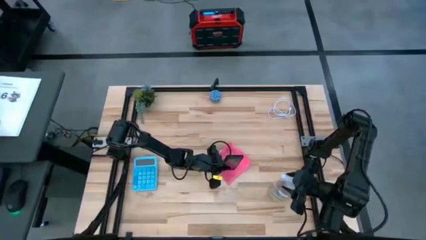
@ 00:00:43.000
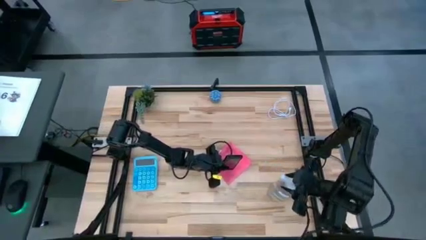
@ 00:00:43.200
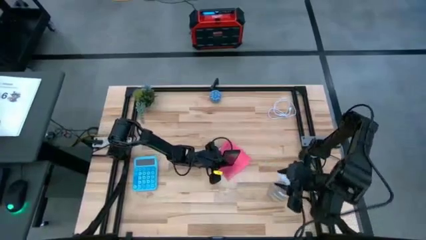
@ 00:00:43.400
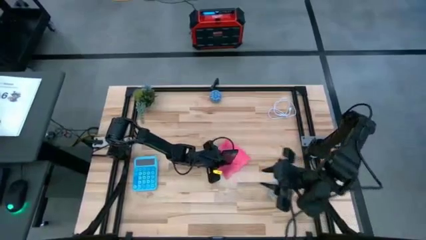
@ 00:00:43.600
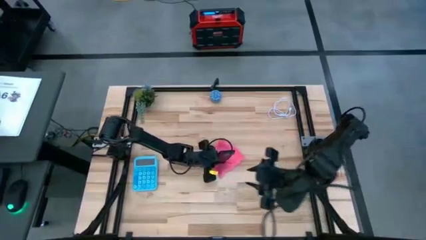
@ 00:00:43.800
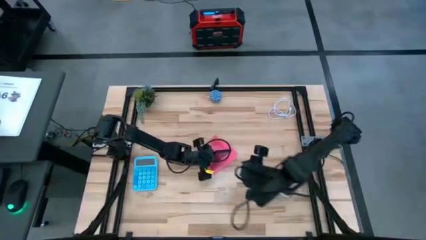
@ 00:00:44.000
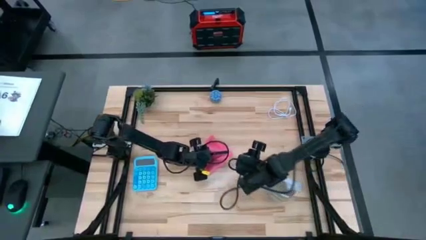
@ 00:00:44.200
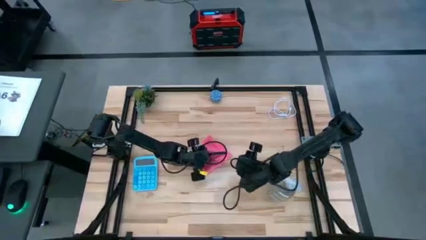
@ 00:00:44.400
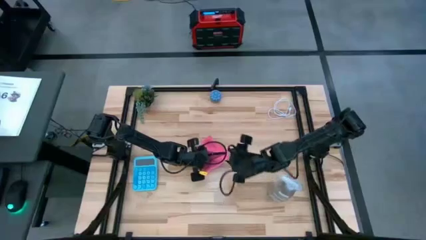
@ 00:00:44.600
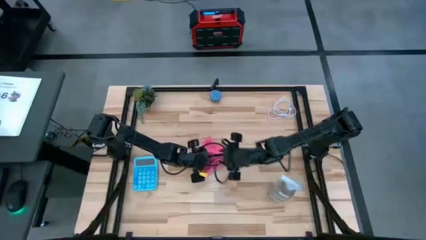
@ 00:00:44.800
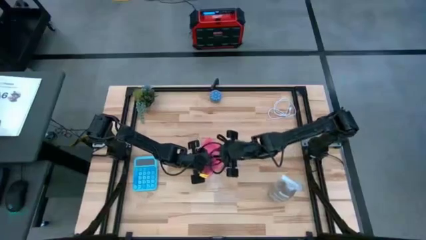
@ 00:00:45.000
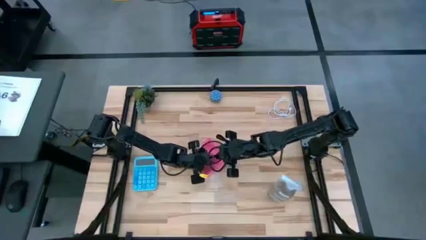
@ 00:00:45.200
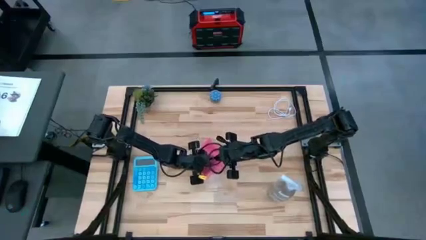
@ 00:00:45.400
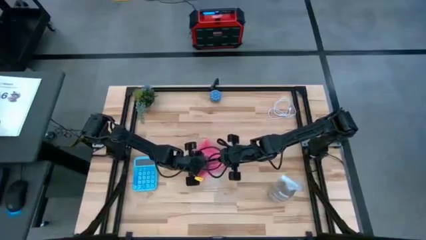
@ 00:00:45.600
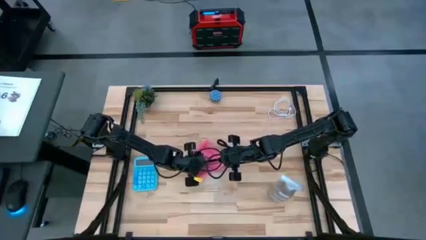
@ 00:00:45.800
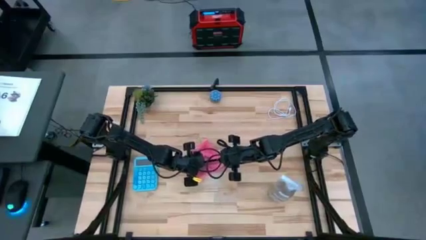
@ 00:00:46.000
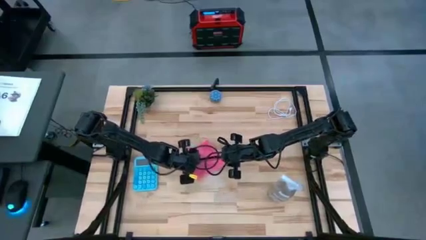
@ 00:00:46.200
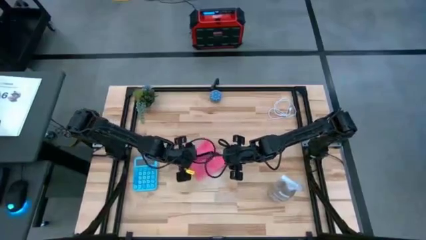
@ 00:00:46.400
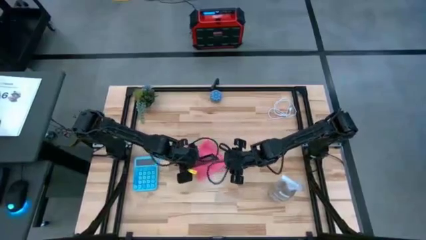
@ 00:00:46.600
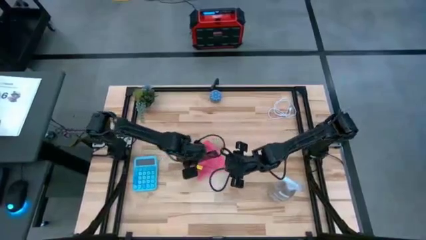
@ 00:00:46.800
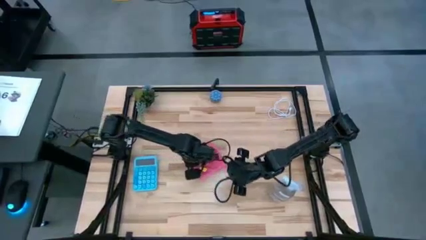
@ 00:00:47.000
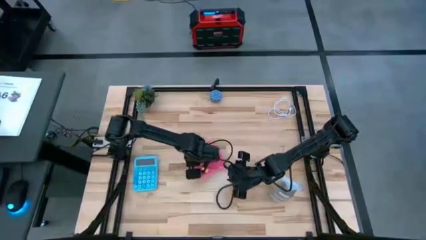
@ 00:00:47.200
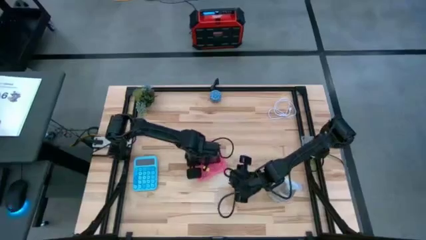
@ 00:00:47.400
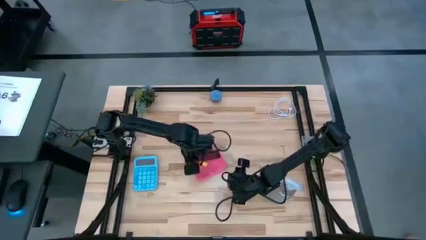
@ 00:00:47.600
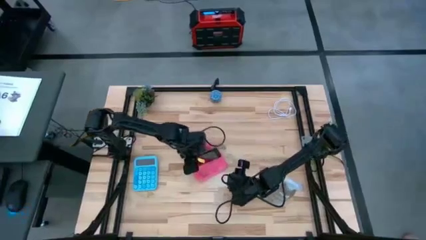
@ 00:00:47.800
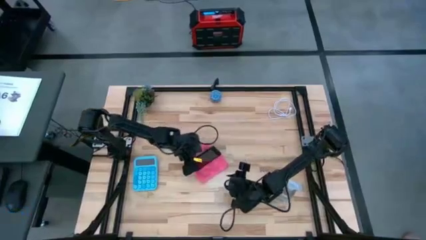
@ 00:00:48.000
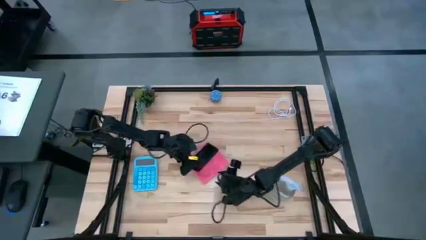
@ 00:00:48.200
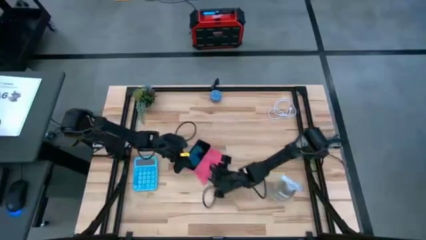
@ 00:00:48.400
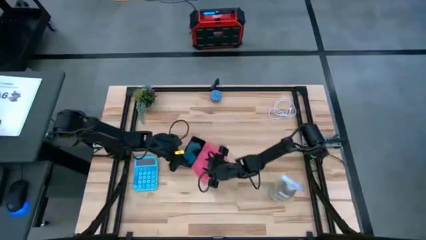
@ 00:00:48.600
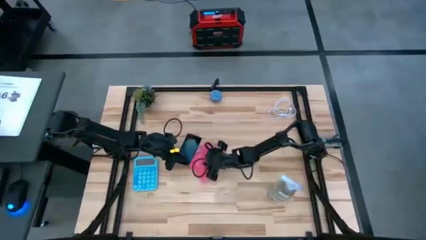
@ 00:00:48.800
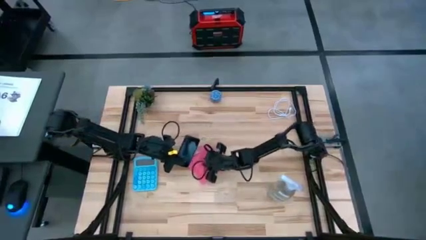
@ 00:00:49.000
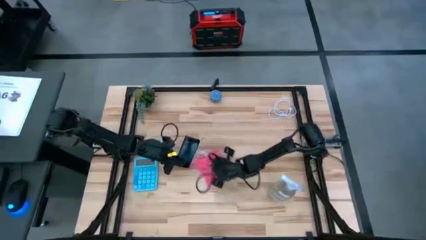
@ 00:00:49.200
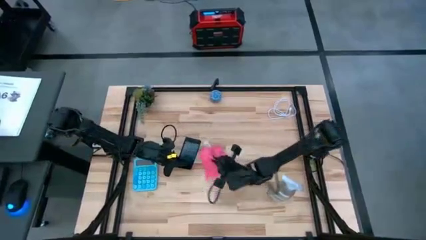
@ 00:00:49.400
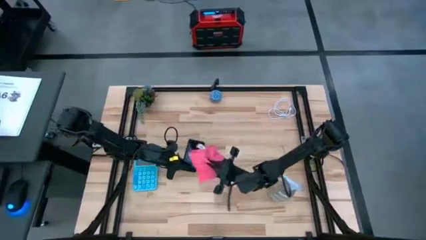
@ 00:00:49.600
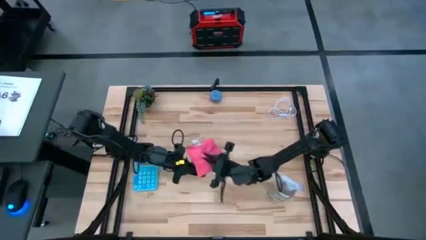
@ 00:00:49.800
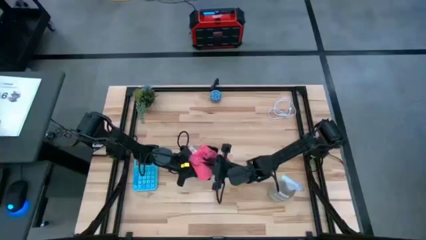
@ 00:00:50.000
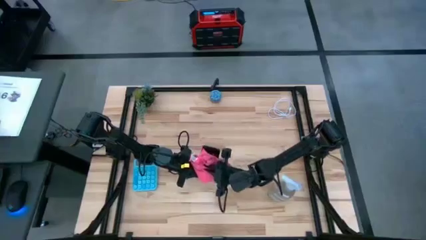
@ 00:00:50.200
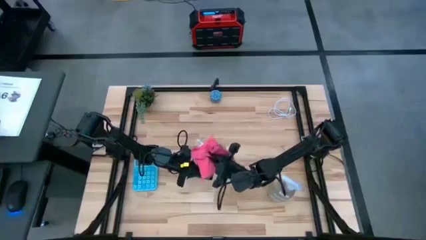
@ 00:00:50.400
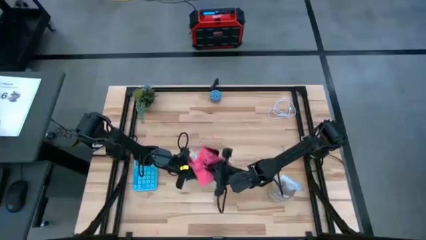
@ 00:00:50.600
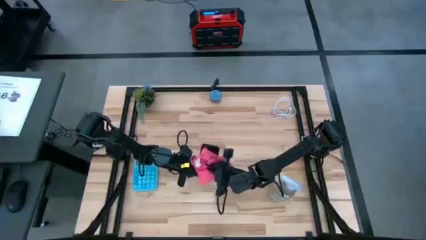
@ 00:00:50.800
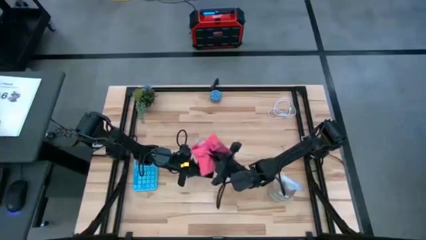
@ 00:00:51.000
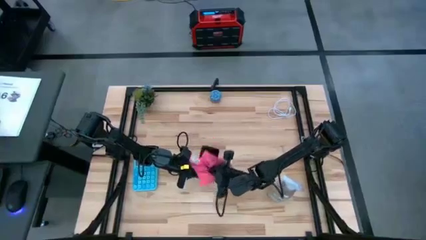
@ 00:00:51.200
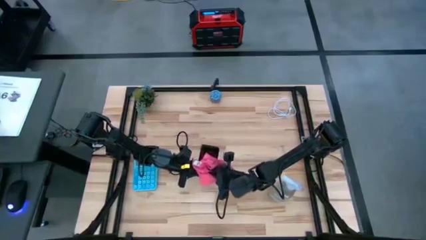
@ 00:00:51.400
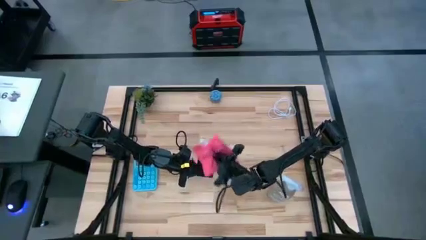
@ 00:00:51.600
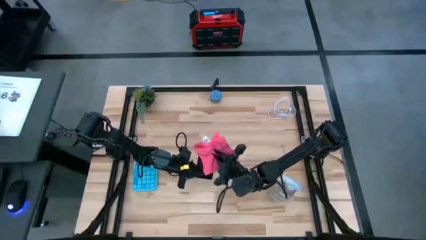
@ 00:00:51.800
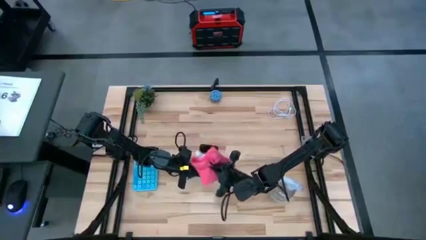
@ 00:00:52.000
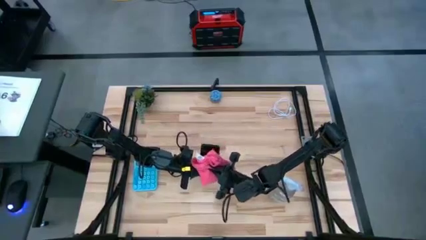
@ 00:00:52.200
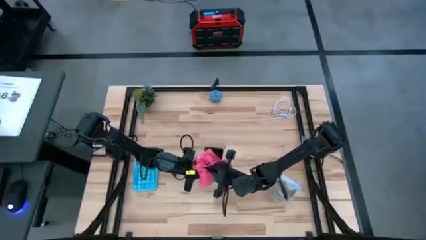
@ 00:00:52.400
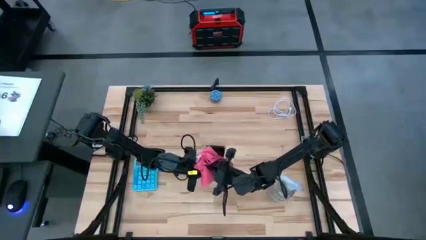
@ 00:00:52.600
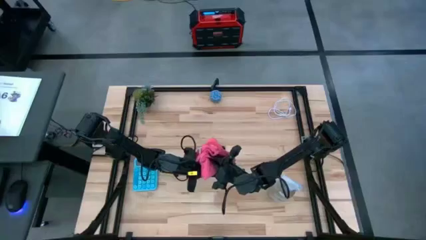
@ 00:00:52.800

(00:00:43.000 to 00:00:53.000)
Task: Apply microfiber cloth
Wipe the black cellphone with the pink microfiber cloth
